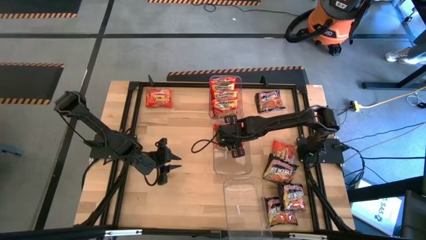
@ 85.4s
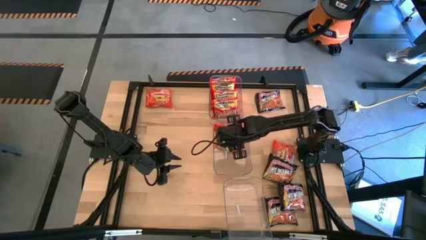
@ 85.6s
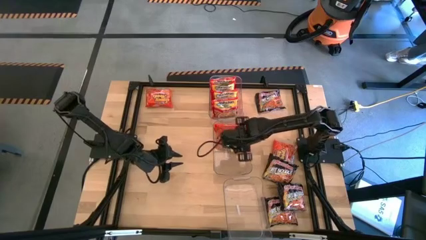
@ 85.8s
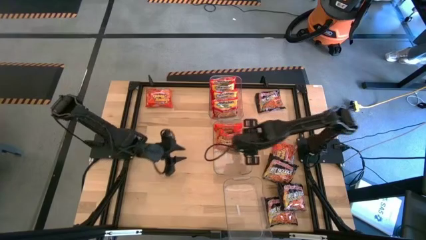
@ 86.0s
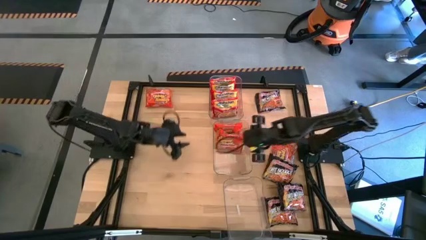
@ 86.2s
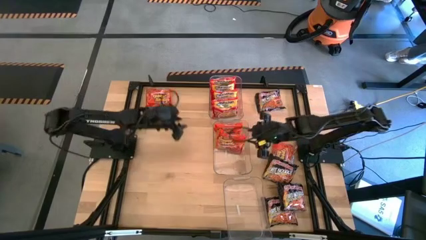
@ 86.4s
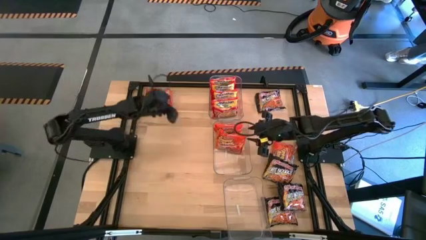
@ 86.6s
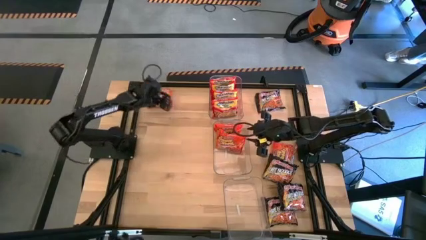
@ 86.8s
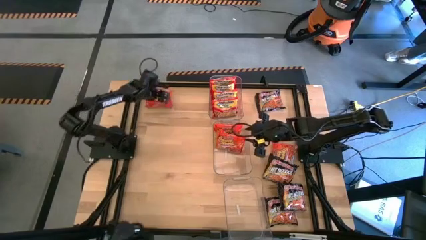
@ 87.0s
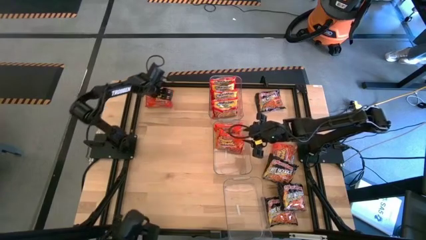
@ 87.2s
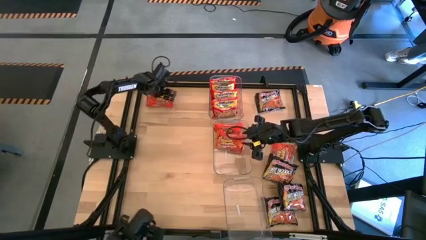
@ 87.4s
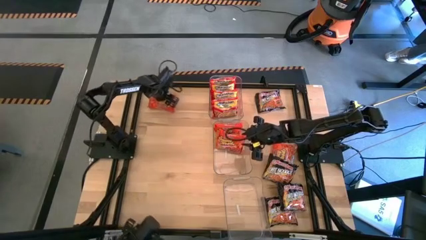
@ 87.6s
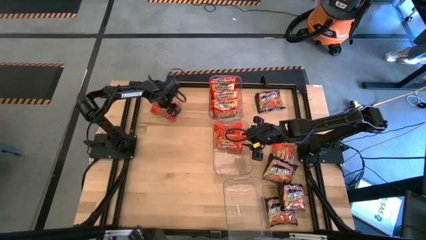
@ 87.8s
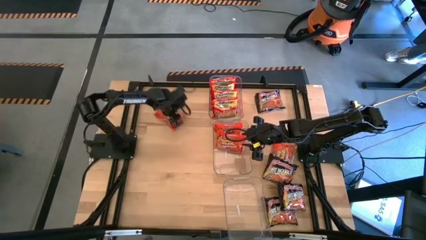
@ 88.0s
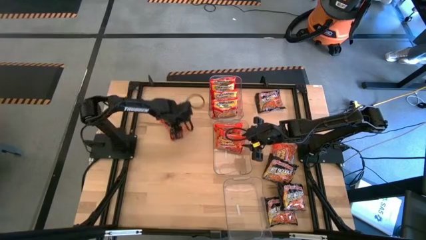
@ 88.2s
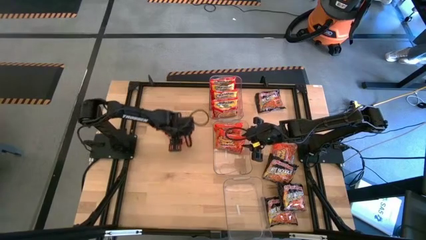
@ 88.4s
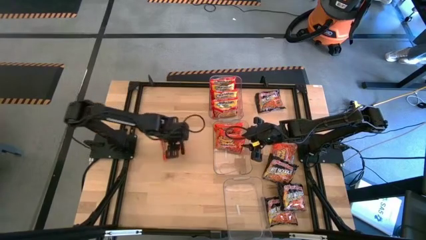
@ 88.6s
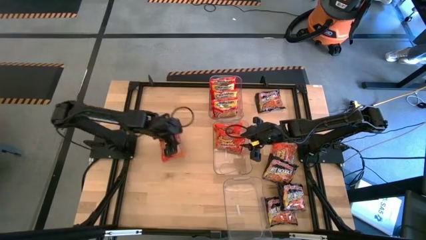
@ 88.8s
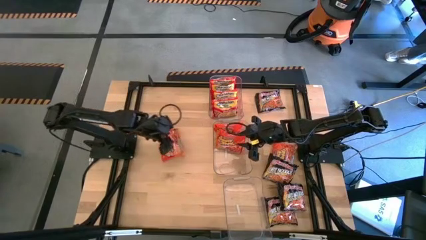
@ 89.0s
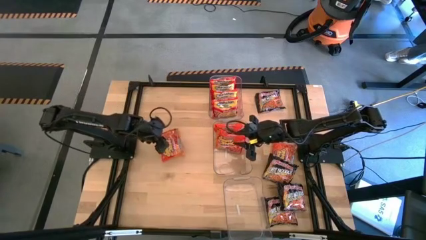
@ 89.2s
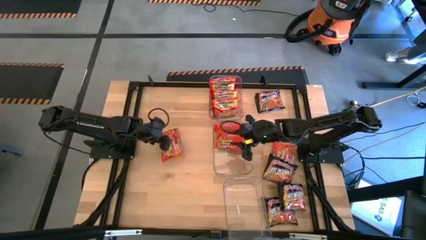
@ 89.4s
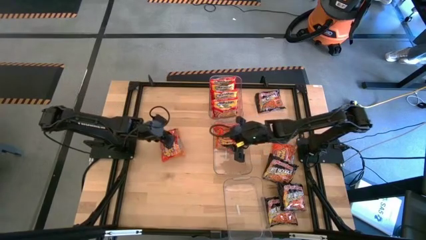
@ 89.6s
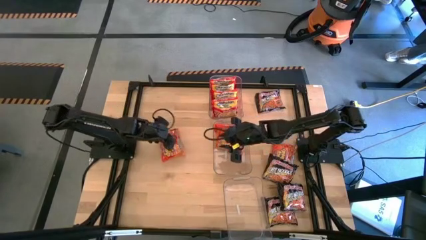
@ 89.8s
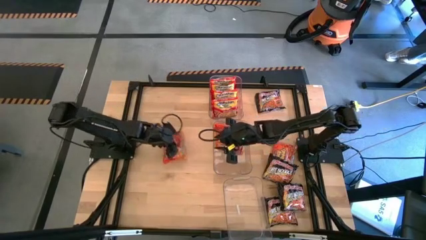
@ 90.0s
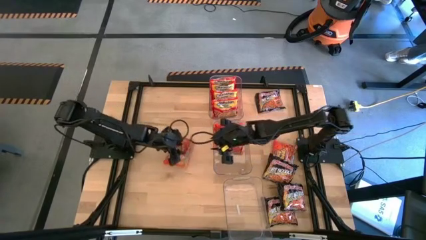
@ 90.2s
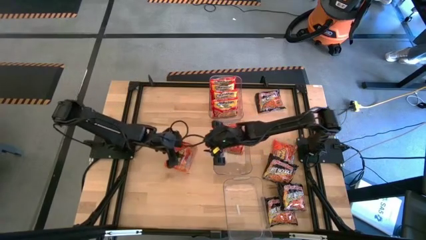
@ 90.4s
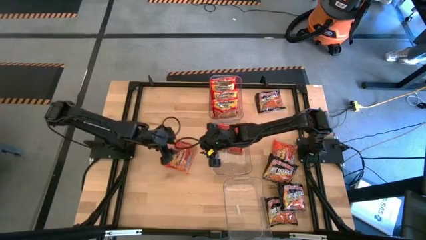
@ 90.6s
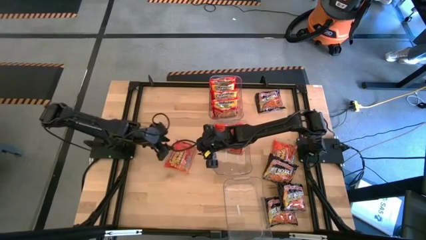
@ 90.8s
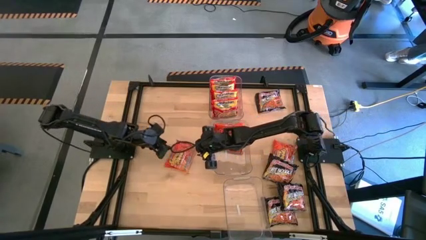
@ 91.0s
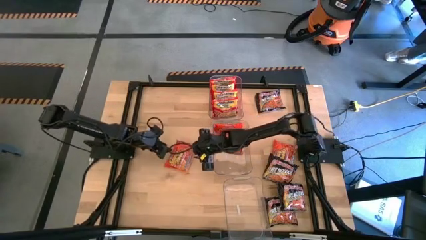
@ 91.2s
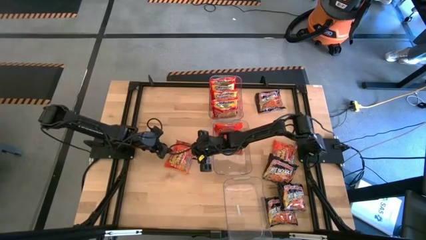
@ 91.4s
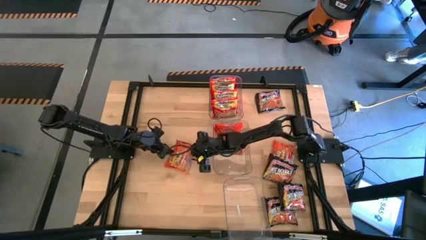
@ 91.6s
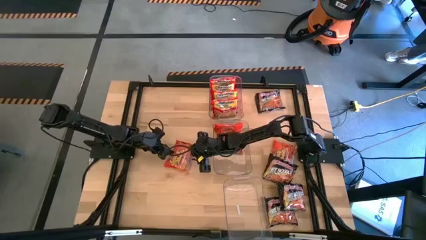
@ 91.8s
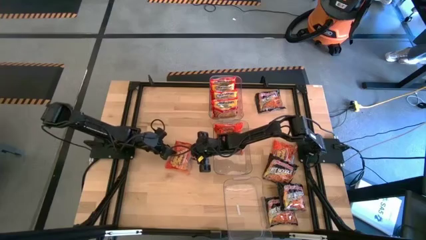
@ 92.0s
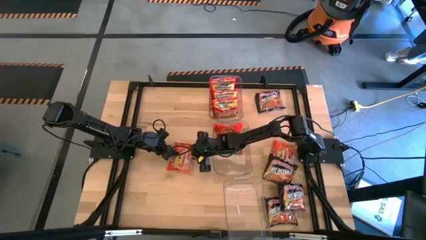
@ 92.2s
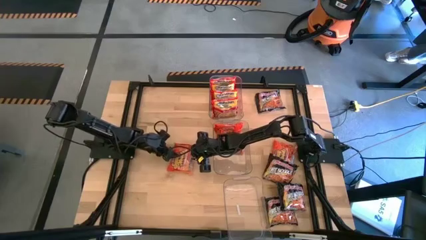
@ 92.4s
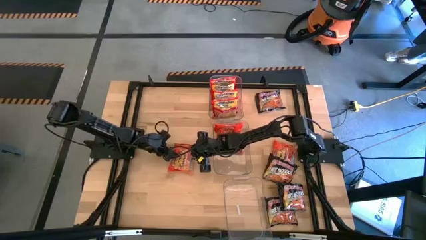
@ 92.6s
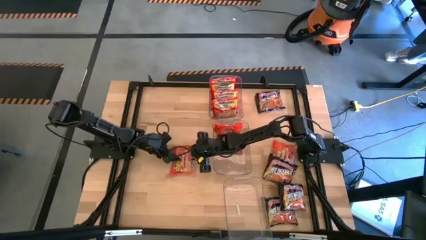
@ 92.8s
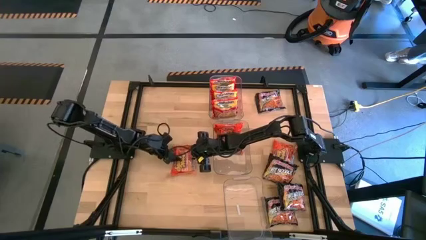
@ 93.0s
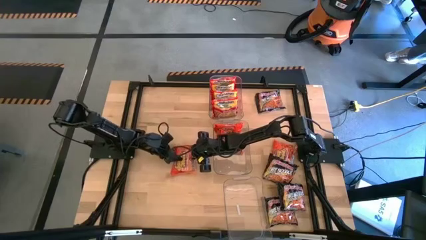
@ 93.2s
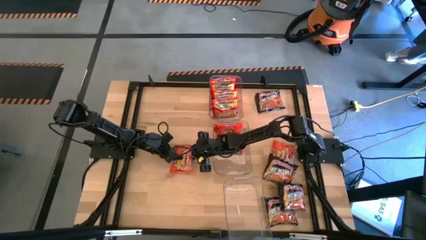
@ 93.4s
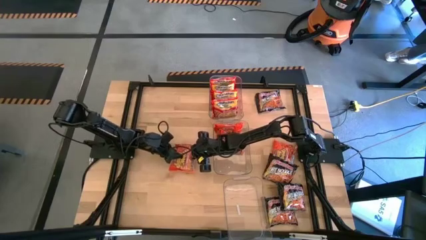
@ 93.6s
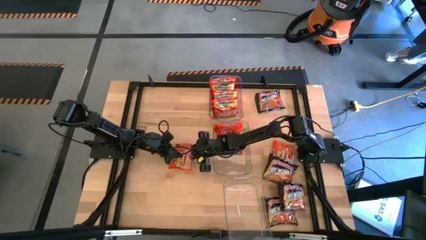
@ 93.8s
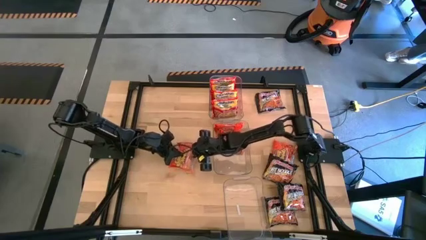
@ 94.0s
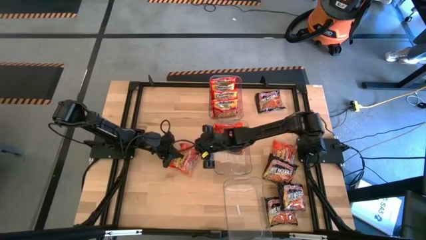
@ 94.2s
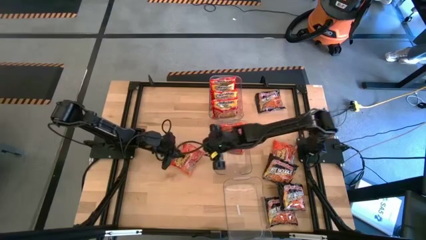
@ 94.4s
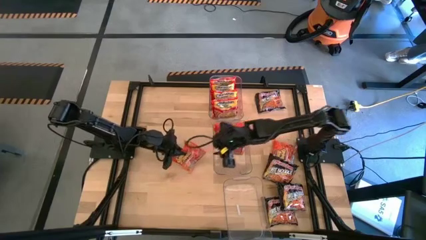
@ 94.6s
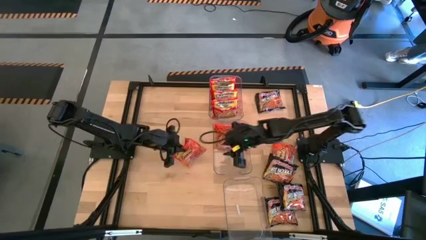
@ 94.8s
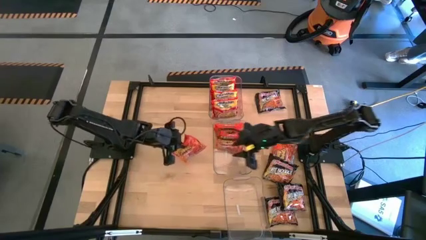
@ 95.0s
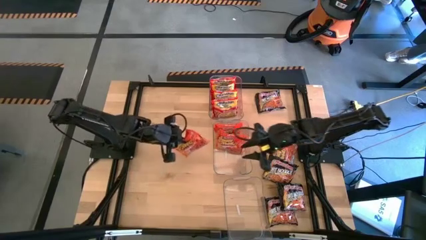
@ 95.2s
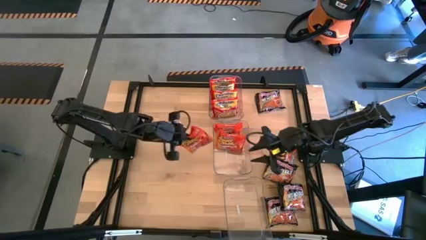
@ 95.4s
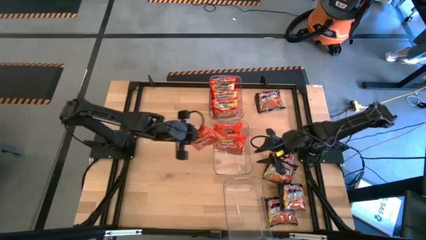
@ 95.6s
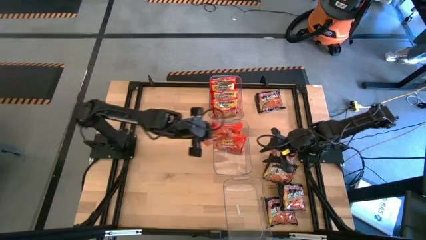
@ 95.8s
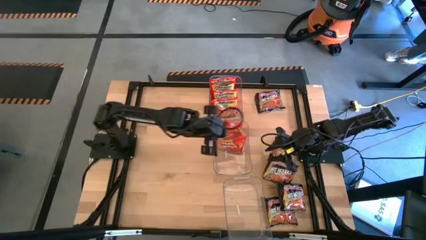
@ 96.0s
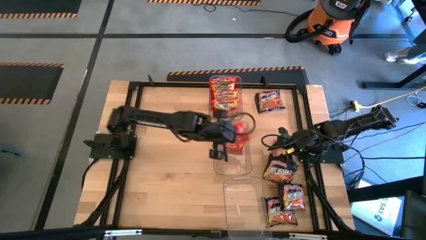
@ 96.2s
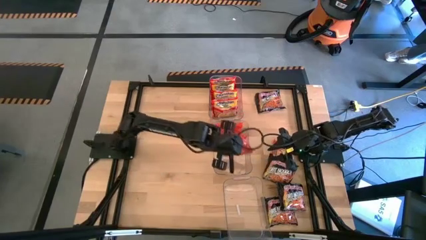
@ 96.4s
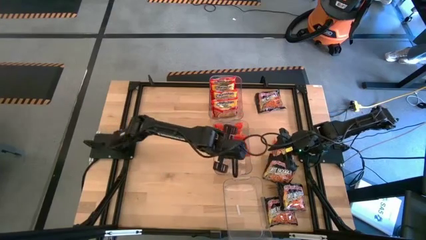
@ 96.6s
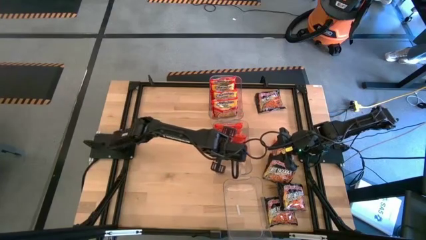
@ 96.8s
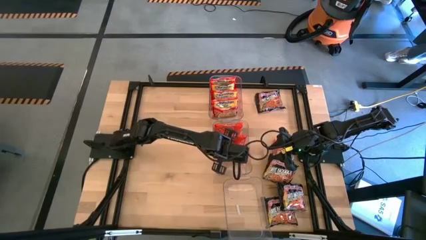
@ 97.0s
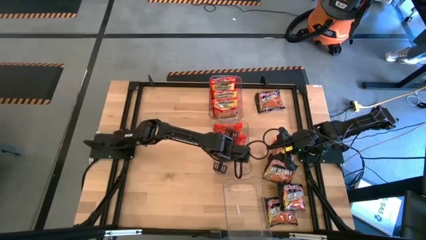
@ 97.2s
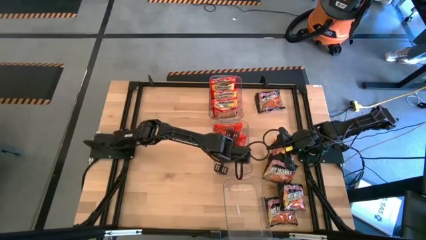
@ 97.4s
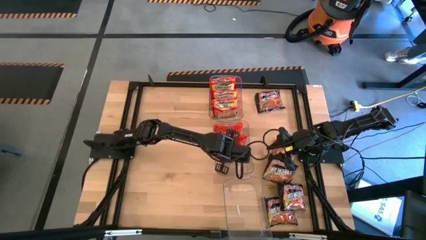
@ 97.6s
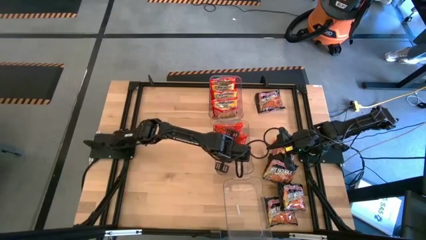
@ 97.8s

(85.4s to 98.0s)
Task: Sort Maruchan noodles
Put the orange noodle pack into the middle transparent bin

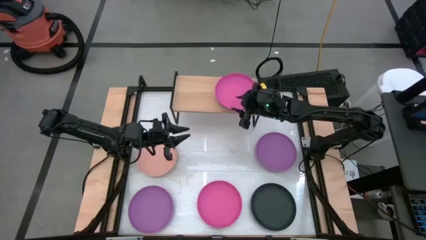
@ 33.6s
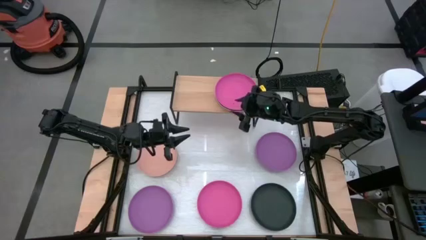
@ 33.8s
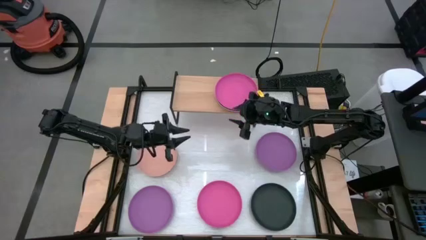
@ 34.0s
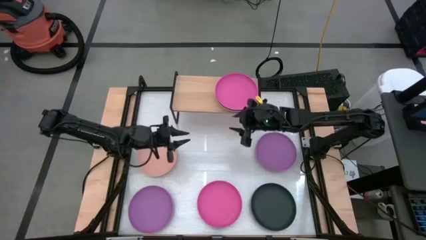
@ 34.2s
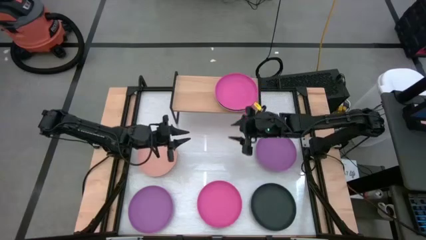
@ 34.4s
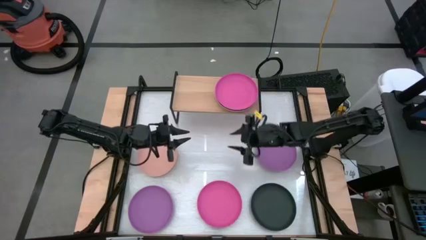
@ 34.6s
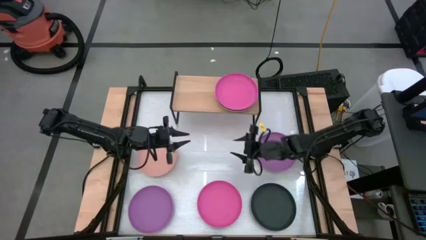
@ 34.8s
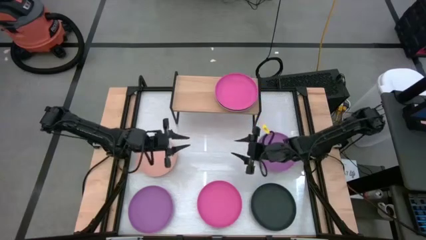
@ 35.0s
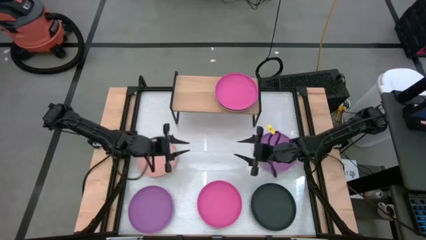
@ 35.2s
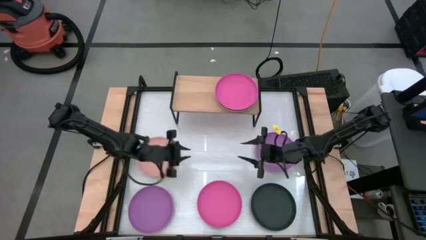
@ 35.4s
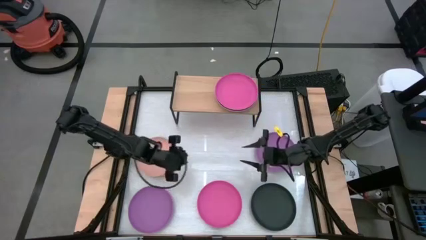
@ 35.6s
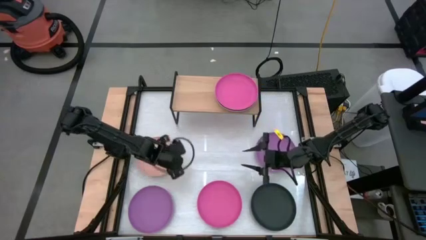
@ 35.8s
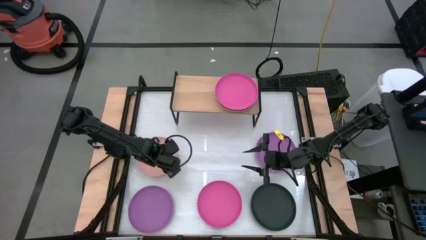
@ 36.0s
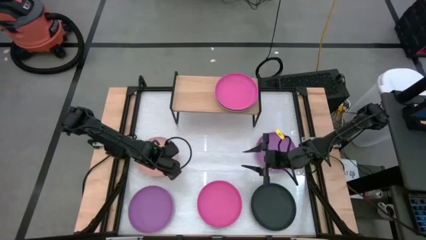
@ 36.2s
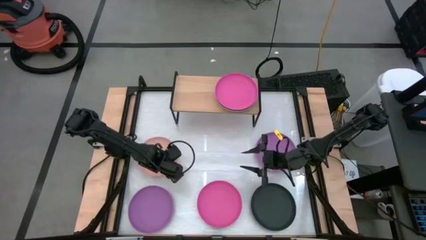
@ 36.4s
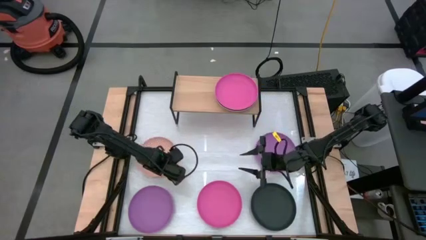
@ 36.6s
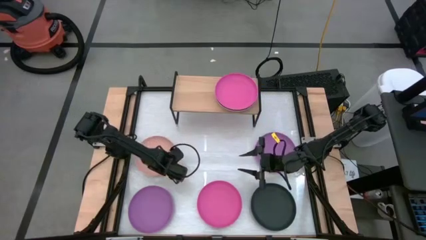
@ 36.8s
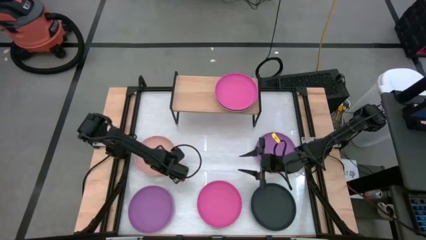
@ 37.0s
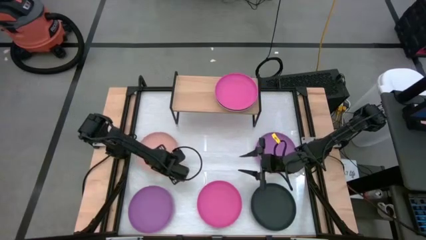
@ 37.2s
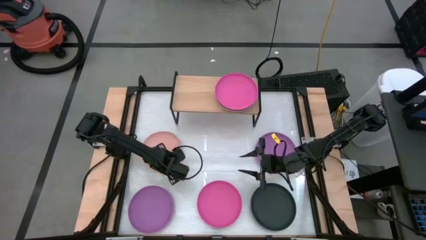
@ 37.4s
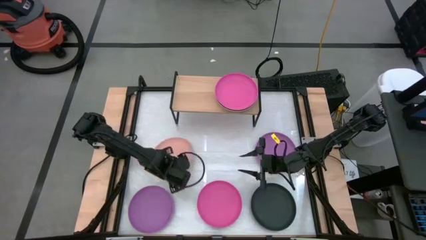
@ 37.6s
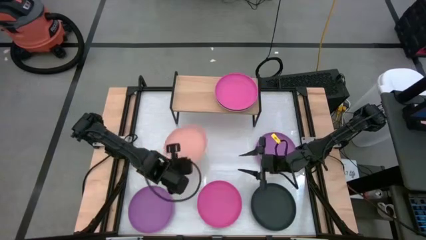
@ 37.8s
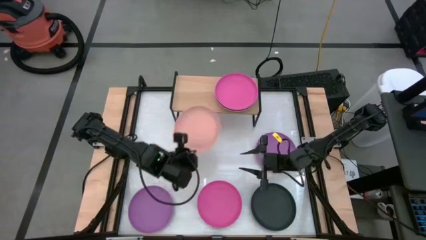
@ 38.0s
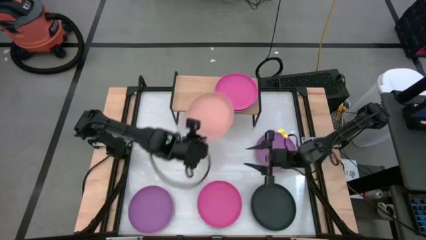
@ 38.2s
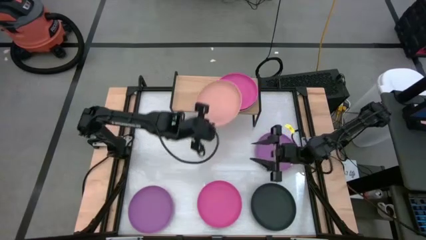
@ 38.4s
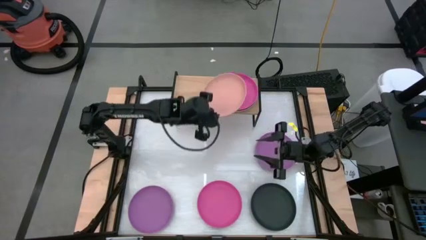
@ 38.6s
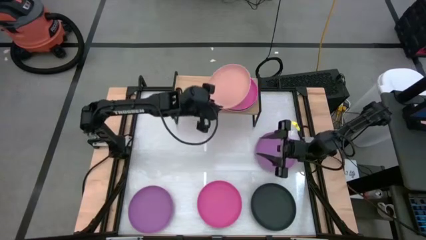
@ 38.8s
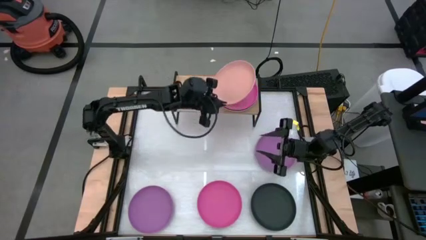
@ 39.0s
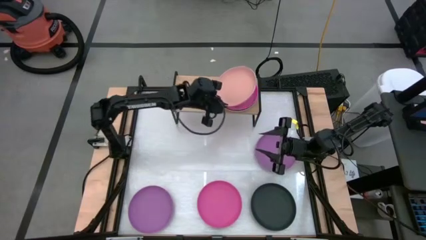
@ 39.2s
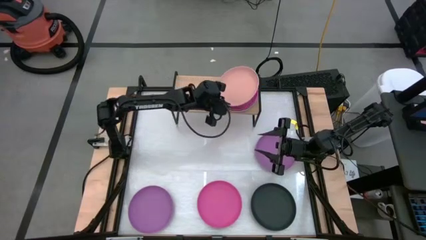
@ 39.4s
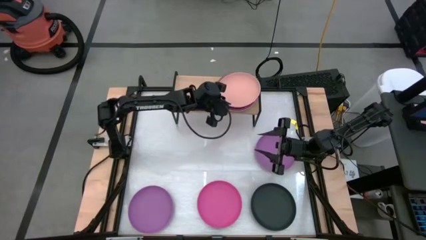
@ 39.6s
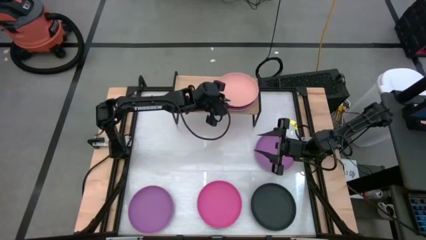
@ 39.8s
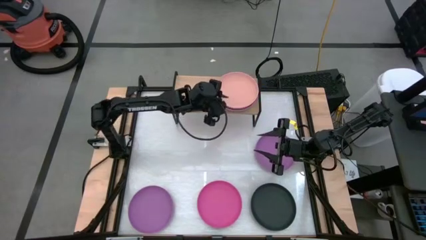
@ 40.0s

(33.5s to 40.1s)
Task: Place and stack plates onto a shelf
Stack the orange plate on top of the pink plate on the shelf
